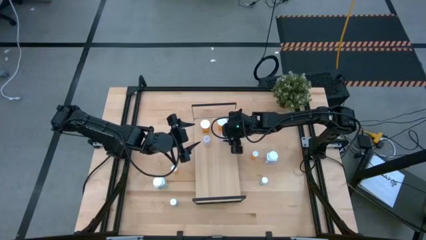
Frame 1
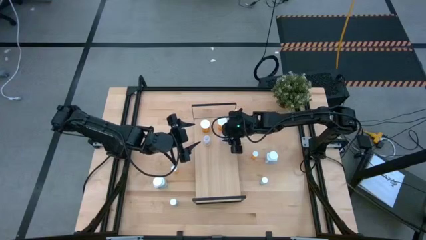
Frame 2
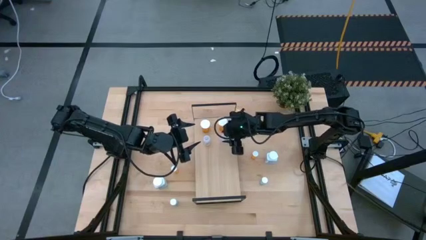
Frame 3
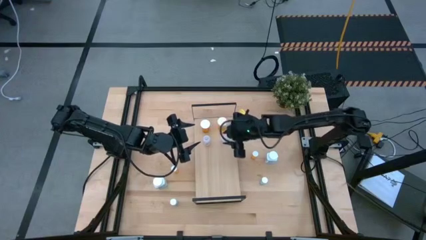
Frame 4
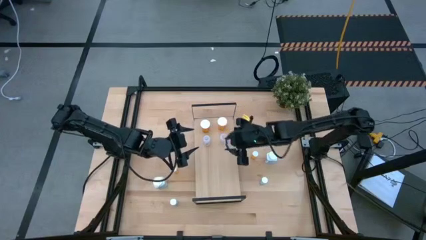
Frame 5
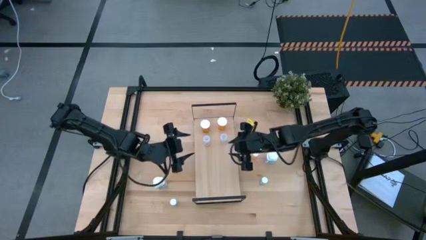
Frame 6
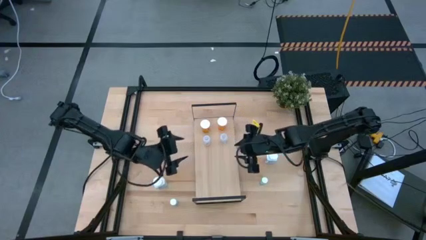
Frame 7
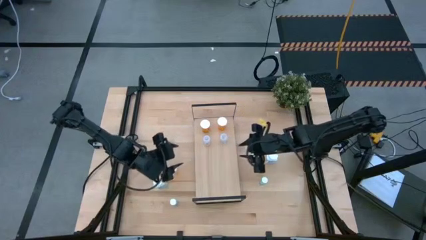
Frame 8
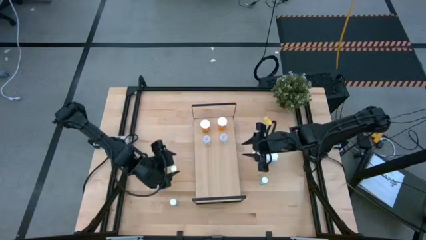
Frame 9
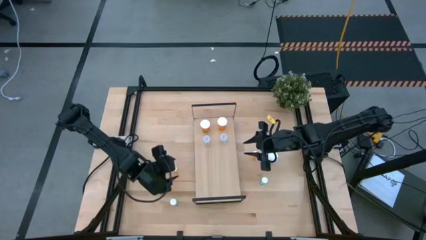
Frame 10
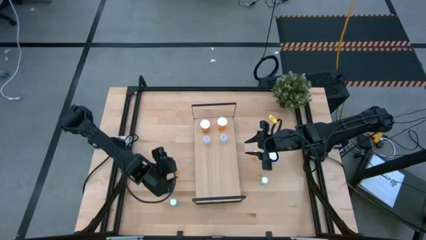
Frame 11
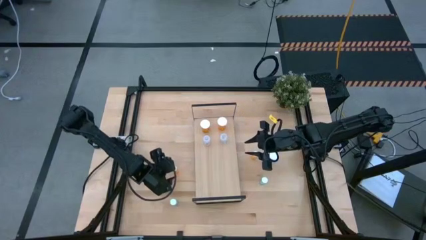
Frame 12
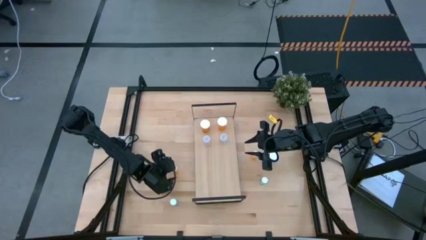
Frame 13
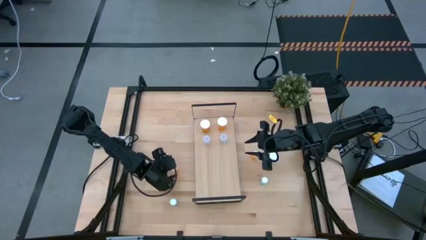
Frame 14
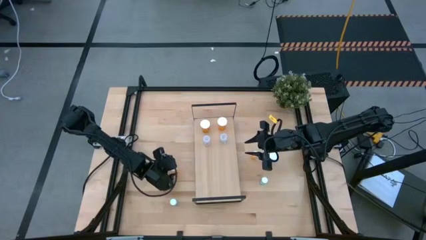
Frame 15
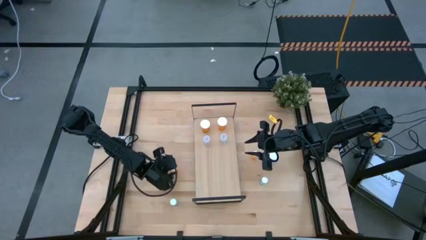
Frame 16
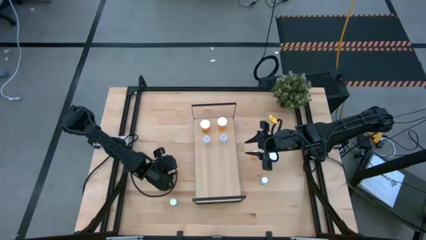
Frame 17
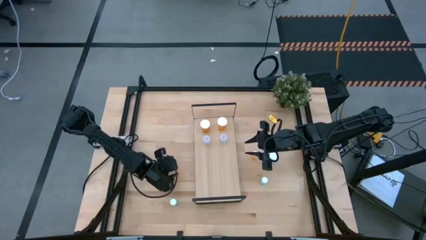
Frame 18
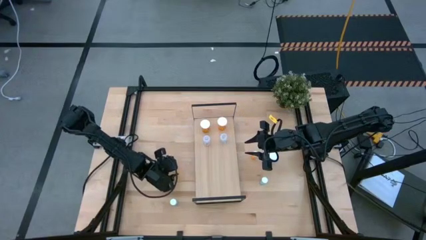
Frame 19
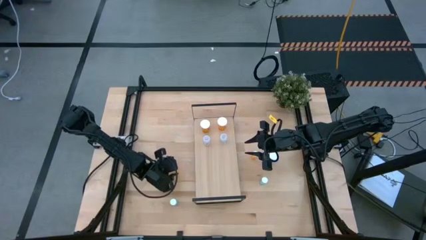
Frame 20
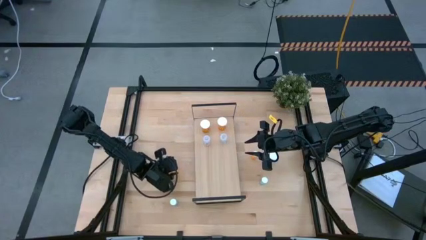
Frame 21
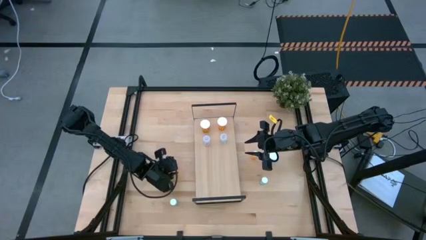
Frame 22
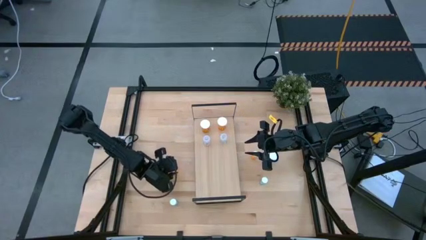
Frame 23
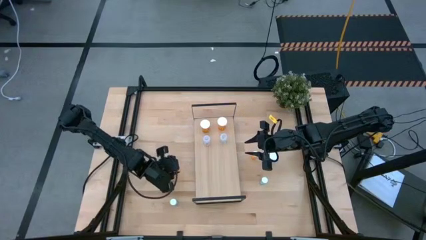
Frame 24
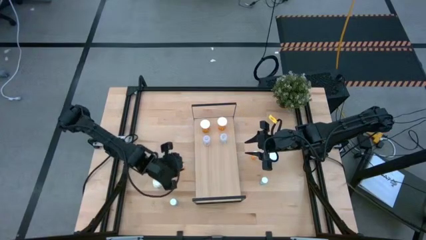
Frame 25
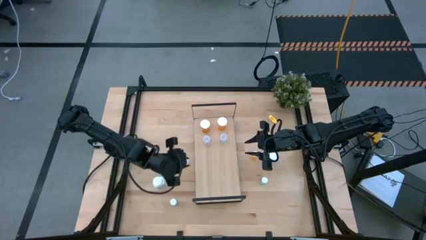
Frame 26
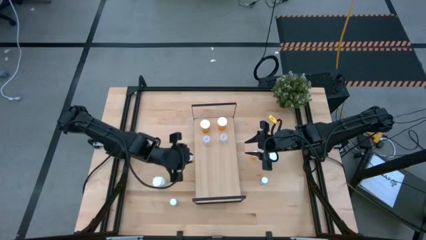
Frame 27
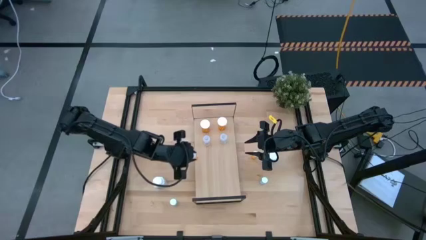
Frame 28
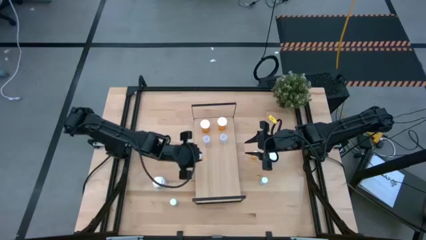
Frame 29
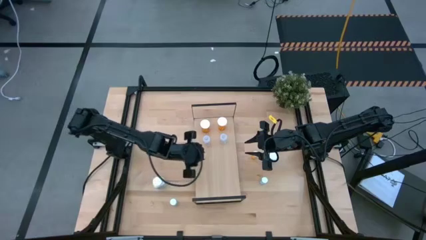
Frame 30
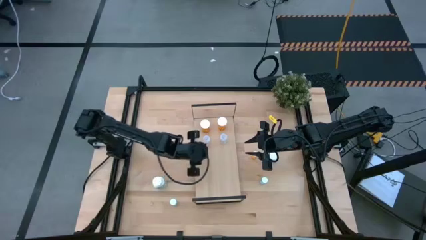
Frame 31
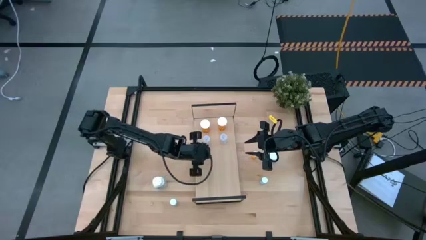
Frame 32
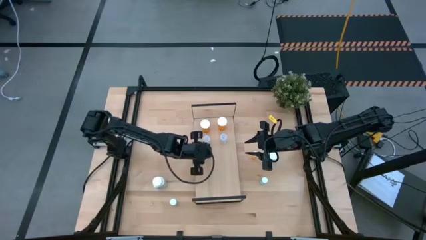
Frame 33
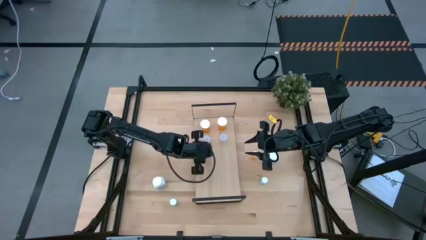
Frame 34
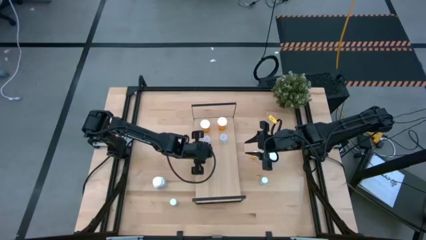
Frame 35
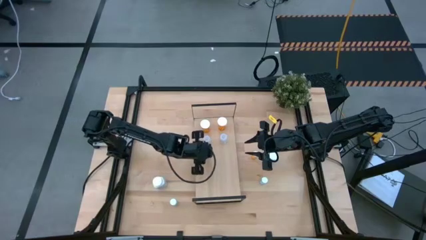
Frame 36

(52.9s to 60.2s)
Task: Pick and place medicine bottles onto shelf by color
Put the left small orange medicine bottle on the shelf

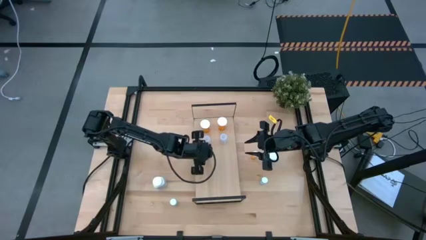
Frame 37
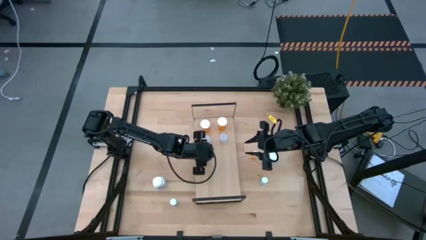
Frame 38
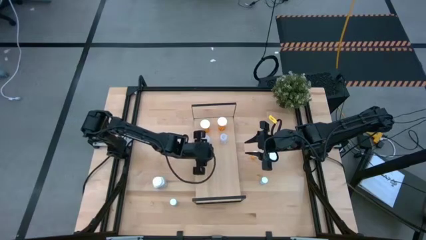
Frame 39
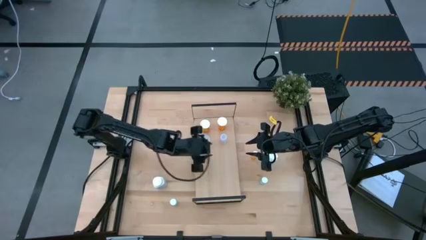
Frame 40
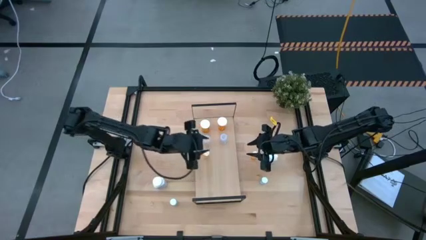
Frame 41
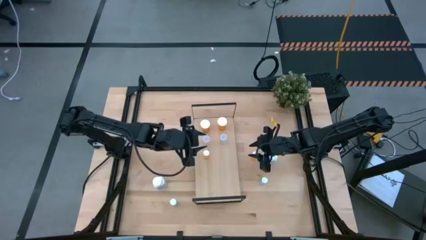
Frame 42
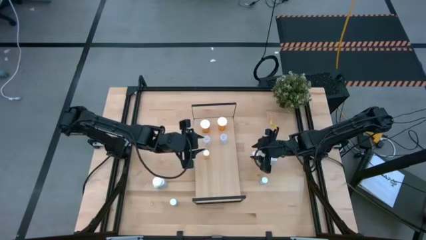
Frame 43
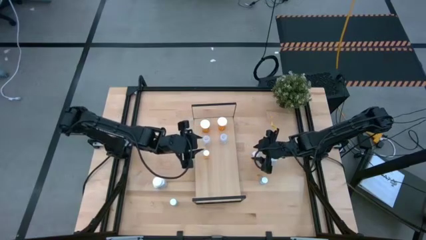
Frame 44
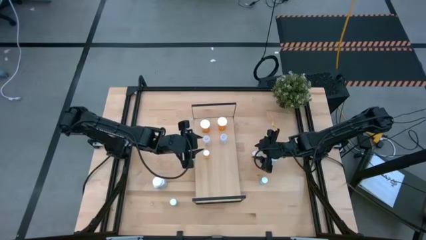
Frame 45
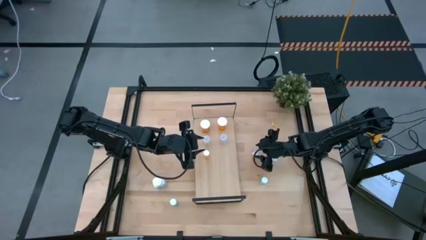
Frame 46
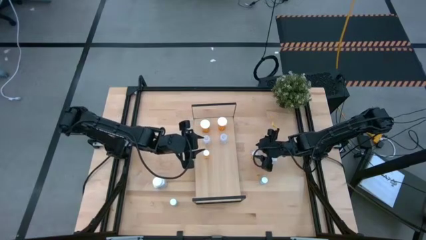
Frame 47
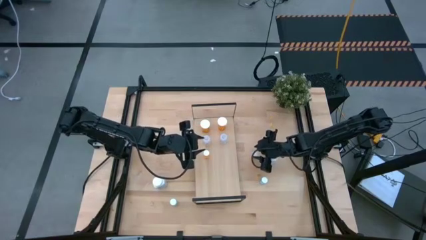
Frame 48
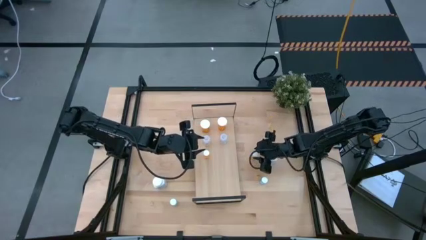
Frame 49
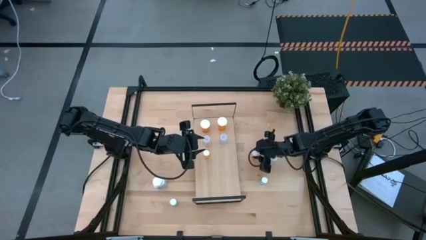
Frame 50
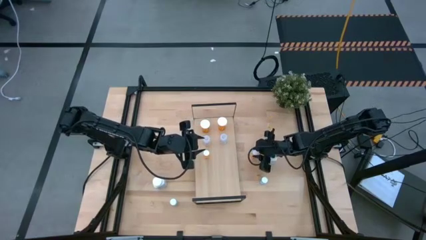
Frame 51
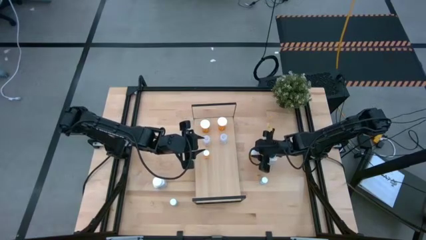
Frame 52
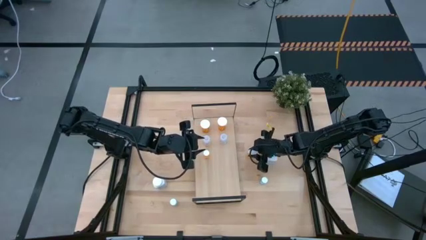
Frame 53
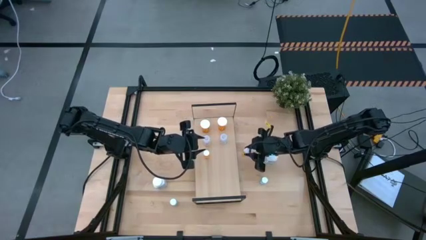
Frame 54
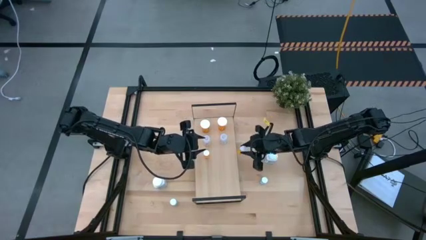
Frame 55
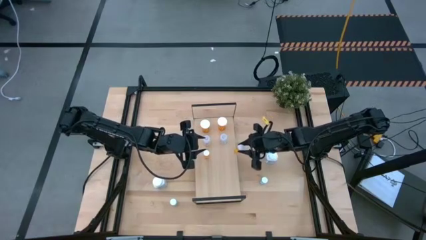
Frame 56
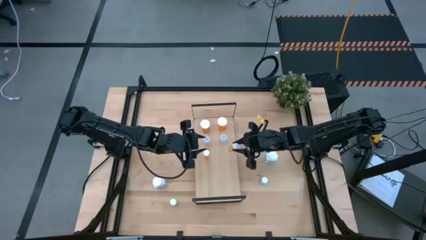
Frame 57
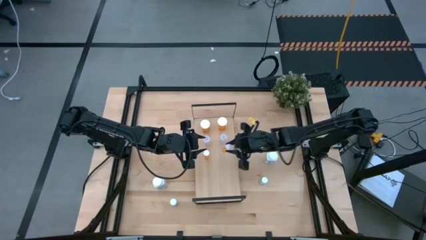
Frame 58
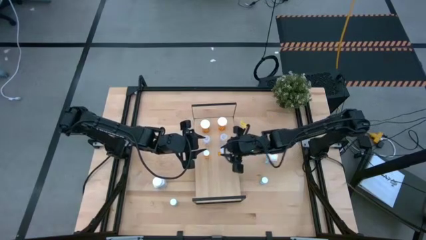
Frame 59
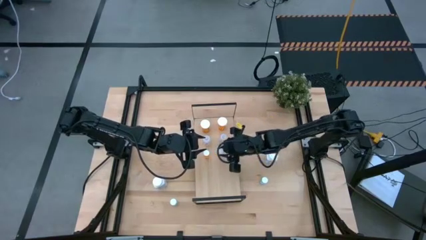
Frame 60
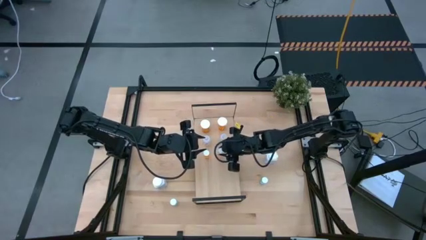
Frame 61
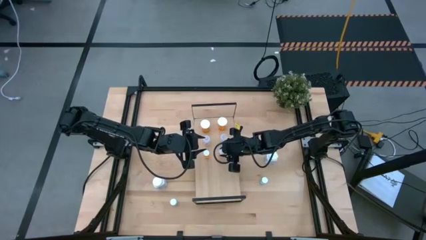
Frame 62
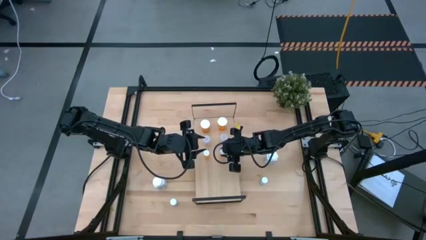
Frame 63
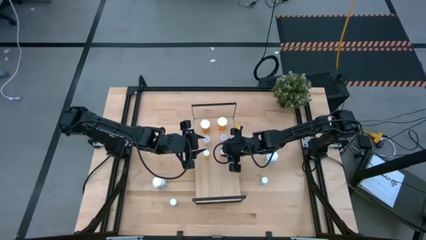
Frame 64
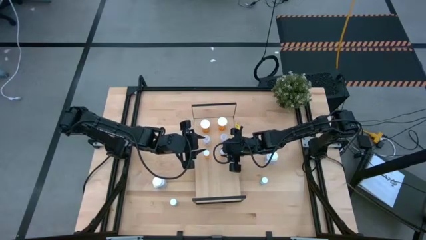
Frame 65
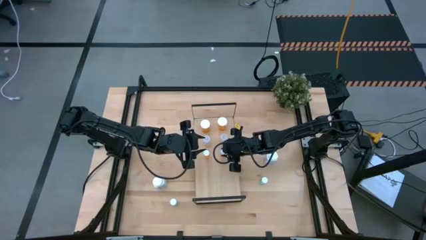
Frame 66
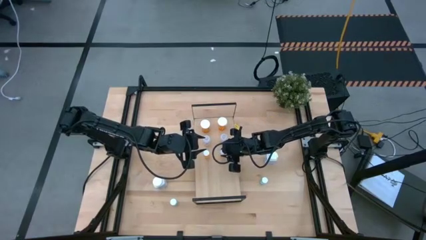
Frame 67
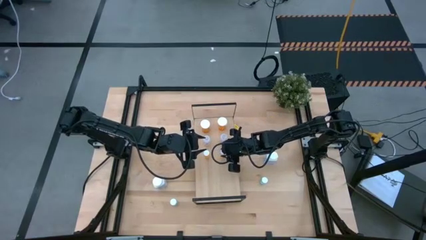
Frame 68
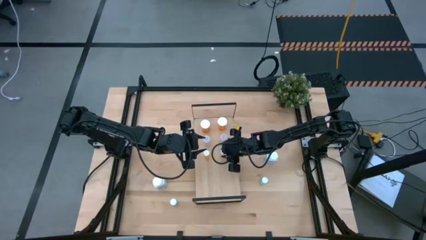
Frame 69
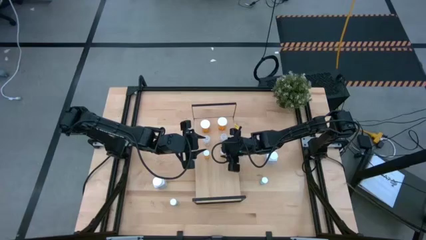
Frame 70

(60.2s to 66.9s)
Put the small orange medicine bottle on the shelf

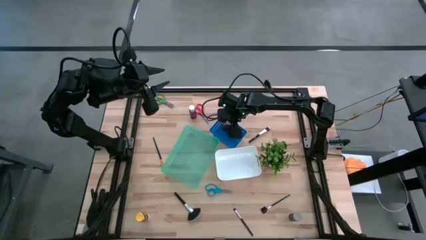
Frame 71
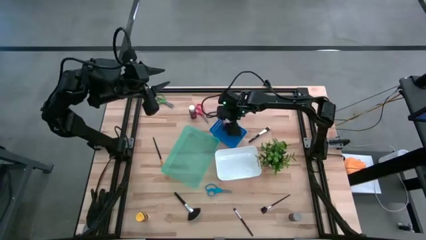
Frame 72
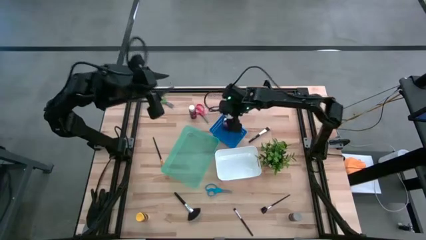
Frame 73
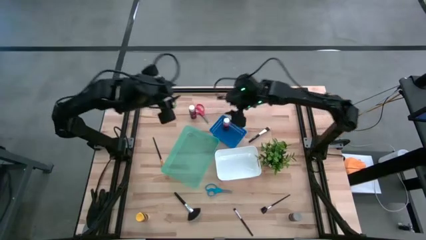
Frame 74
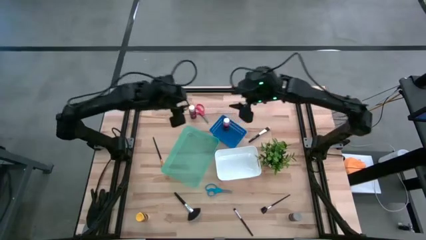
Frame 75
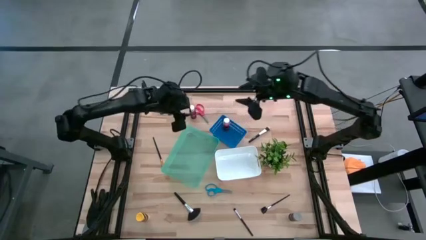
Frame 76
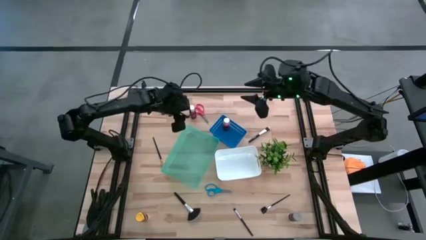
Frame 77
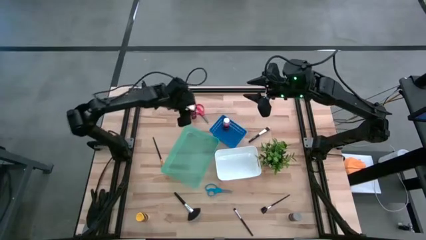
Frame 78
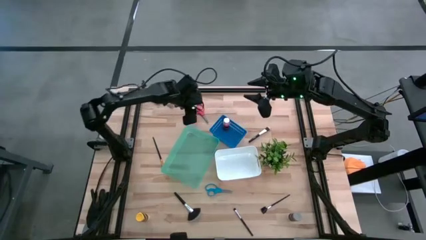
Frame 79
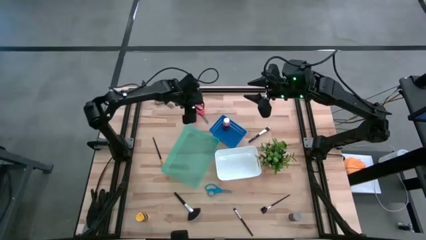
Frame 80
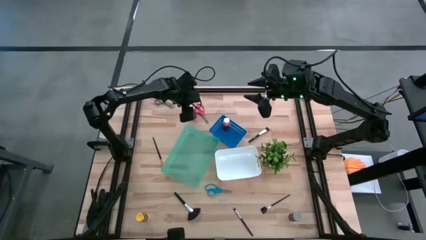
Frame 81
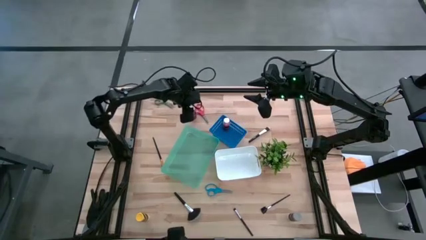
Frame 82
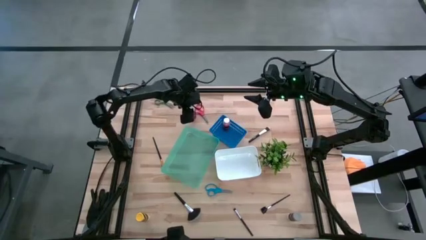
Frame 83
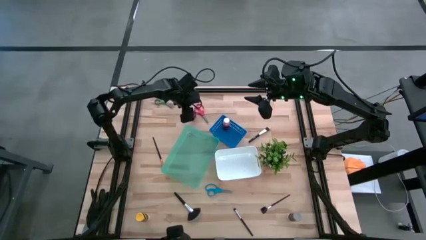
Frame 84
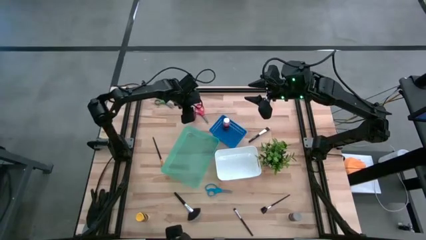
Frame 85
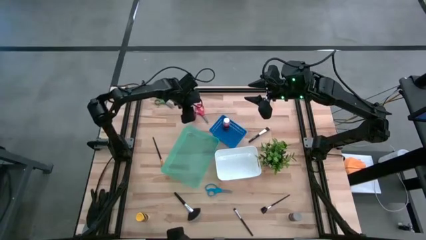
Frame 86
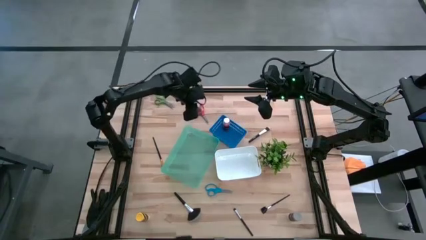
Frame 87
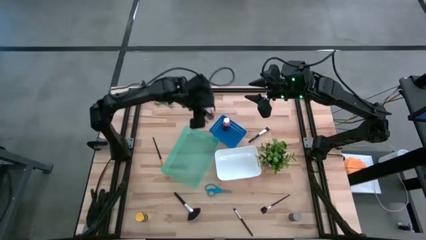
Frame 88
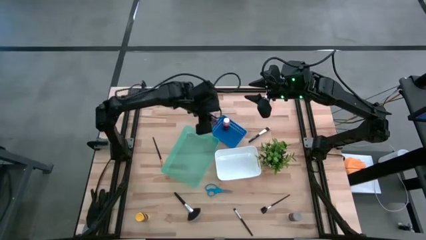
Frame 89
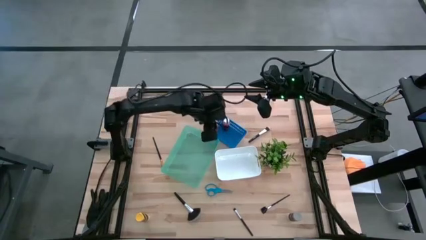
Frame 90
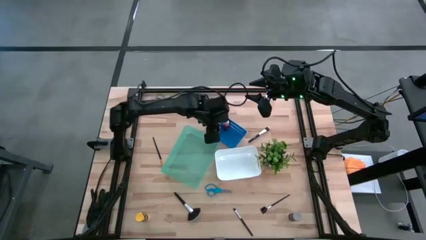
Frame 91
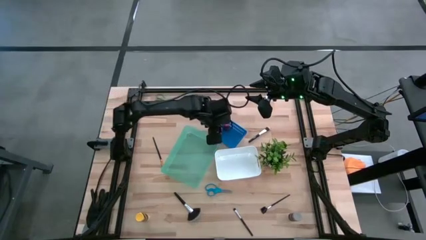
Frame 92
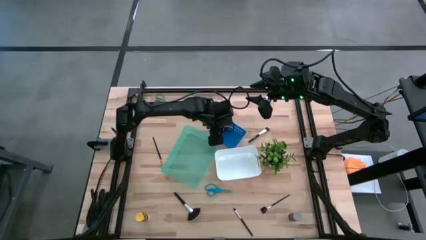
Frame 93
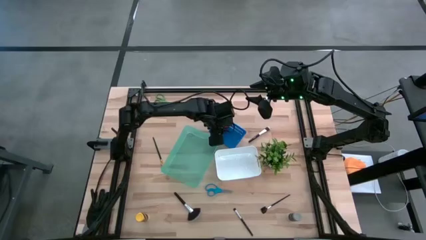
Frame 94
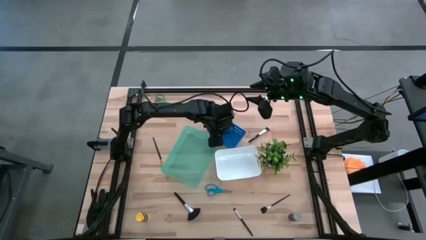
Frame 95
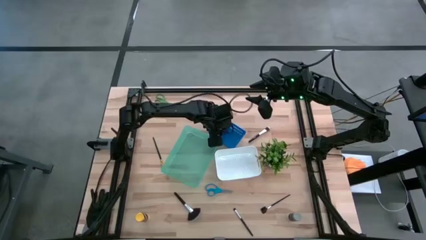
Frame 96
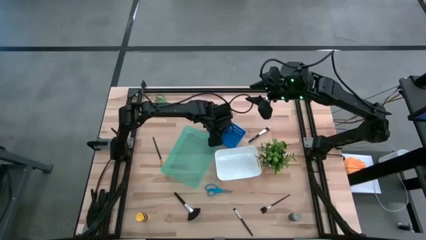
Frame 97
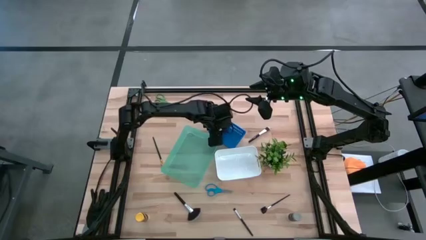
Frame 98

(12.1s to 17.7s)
Task: Pick & Place Paint Supplies
Put the red paint bottle into the blue bin
